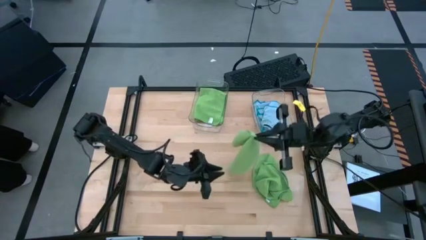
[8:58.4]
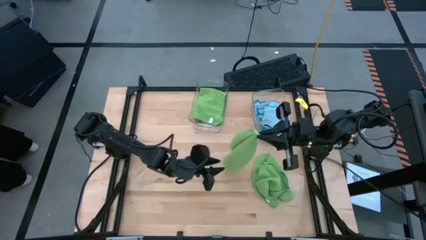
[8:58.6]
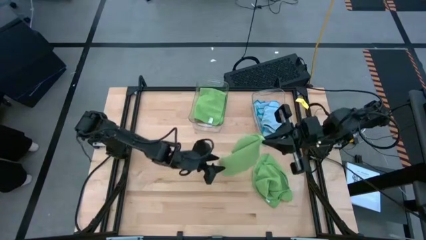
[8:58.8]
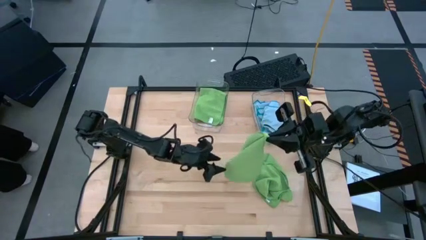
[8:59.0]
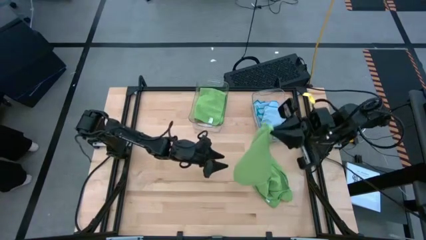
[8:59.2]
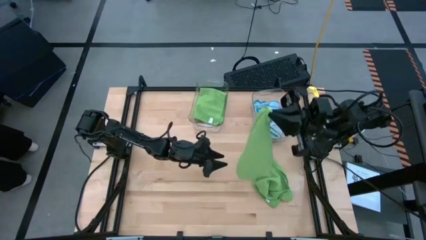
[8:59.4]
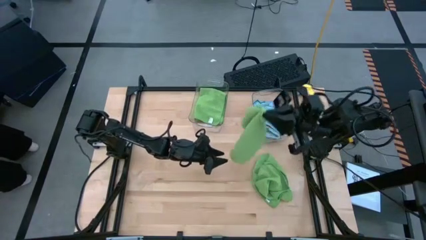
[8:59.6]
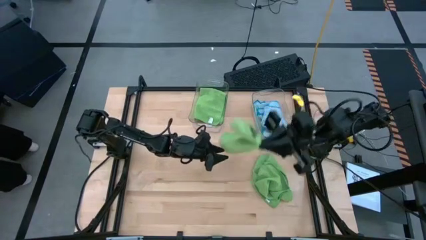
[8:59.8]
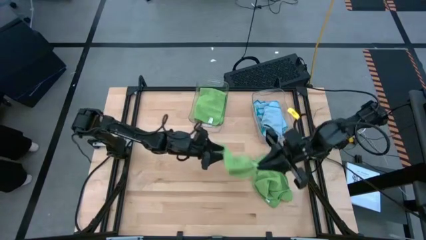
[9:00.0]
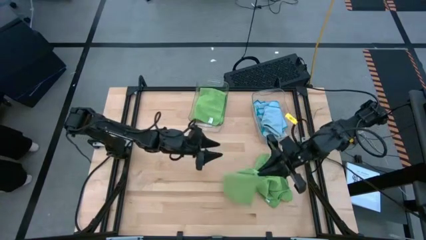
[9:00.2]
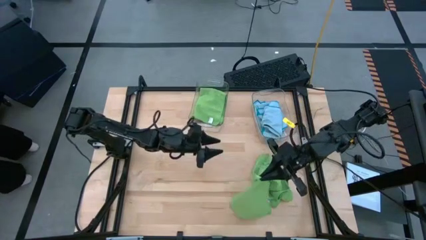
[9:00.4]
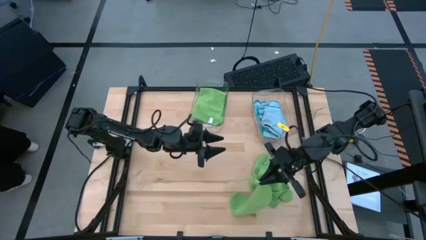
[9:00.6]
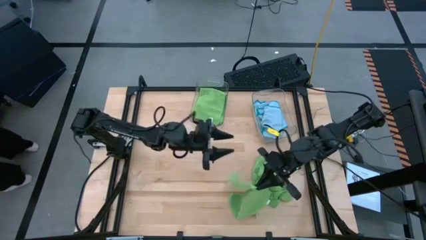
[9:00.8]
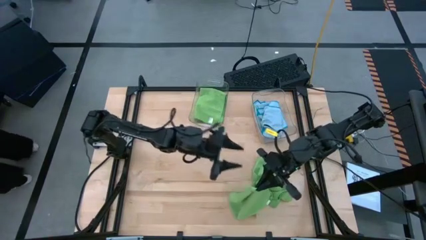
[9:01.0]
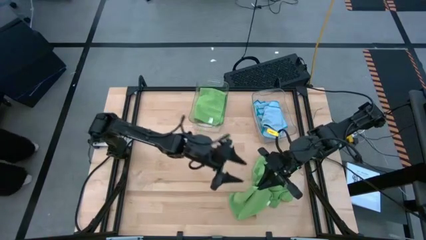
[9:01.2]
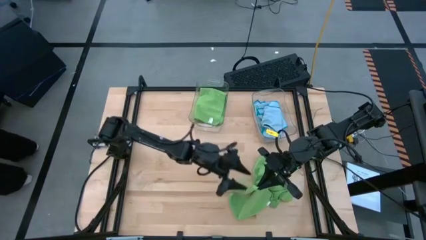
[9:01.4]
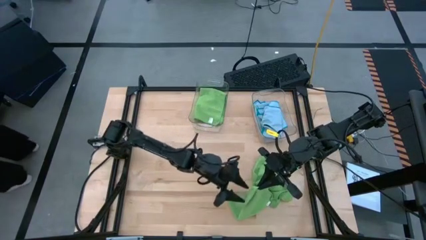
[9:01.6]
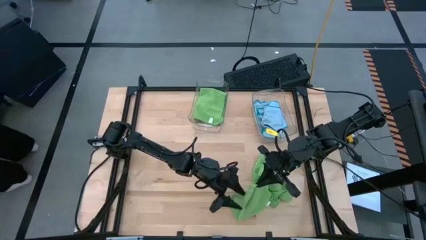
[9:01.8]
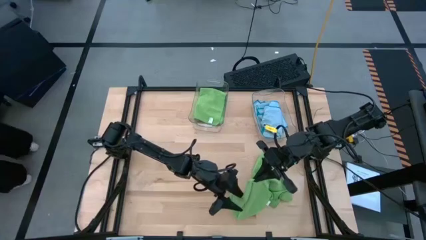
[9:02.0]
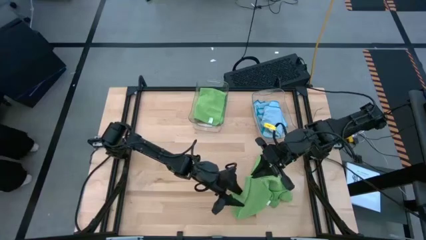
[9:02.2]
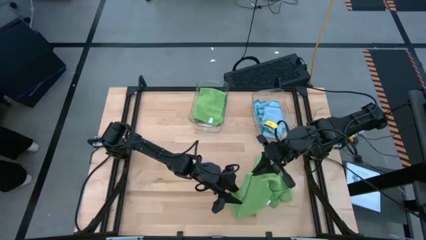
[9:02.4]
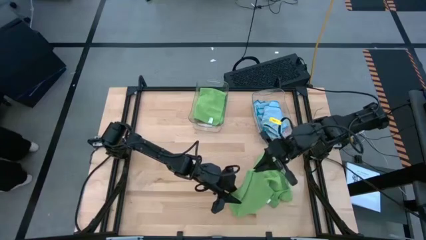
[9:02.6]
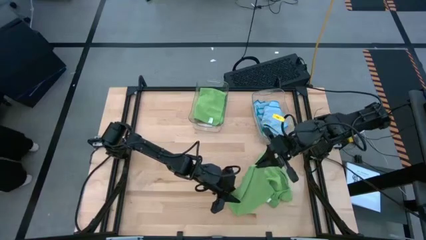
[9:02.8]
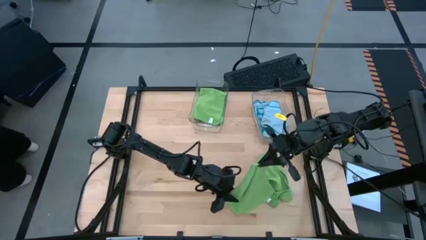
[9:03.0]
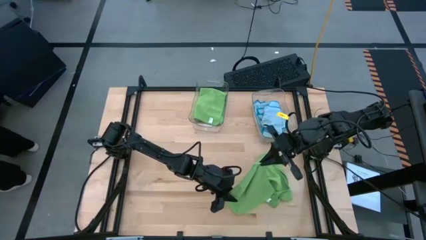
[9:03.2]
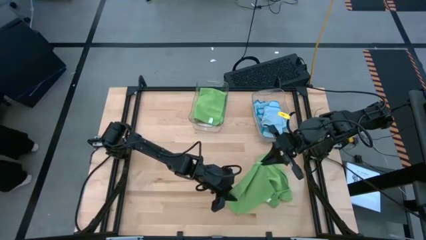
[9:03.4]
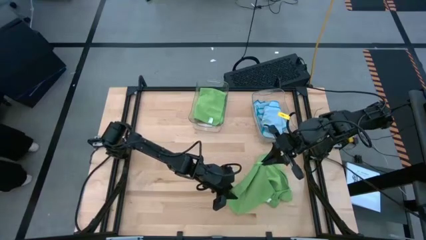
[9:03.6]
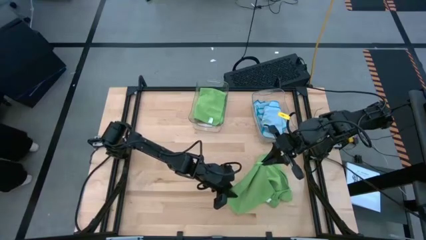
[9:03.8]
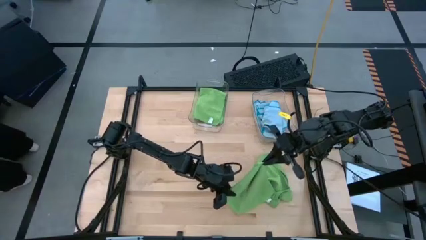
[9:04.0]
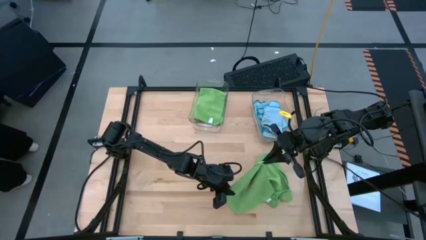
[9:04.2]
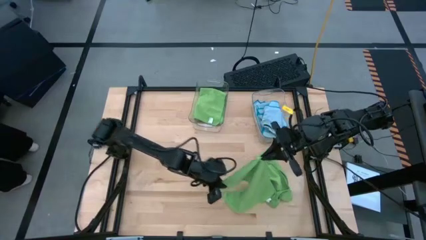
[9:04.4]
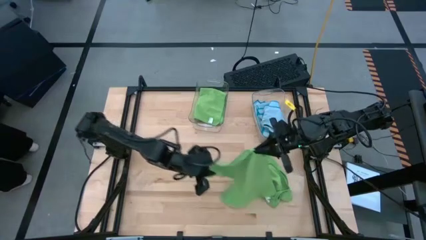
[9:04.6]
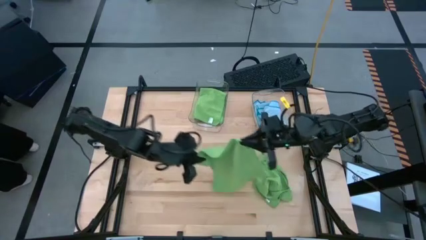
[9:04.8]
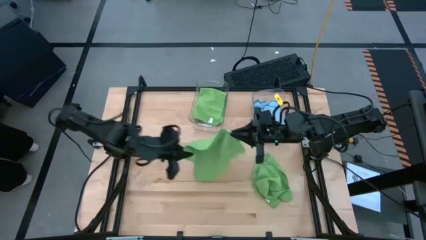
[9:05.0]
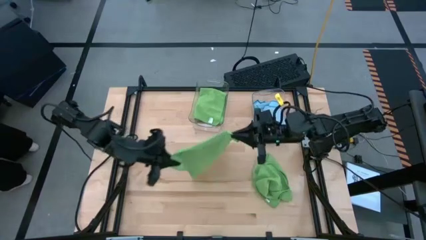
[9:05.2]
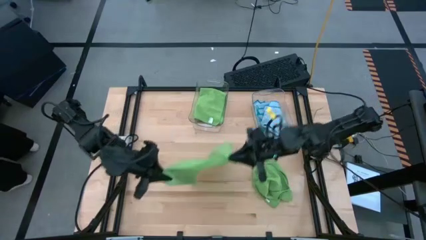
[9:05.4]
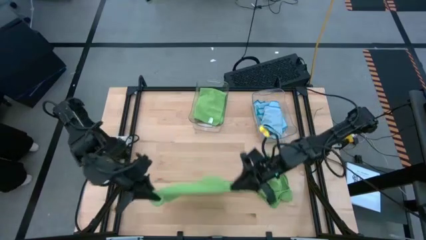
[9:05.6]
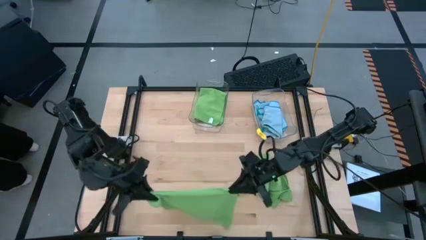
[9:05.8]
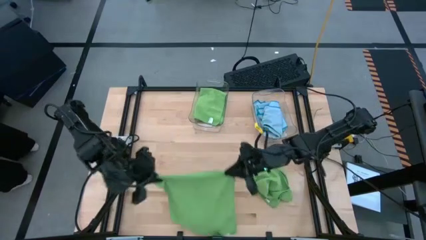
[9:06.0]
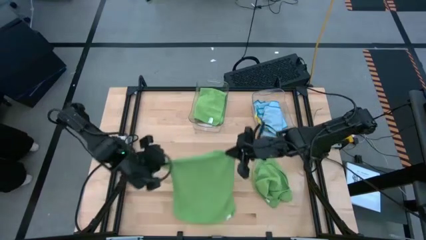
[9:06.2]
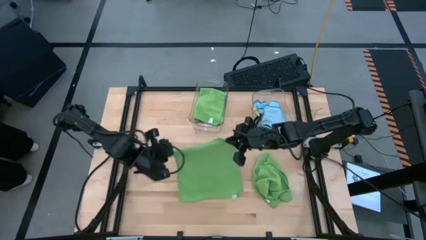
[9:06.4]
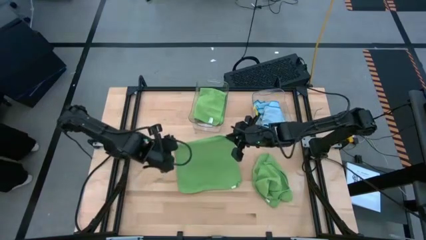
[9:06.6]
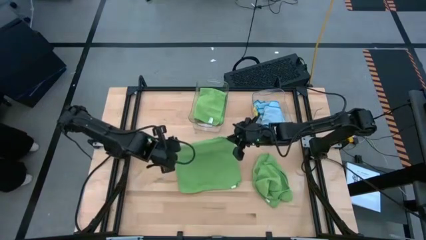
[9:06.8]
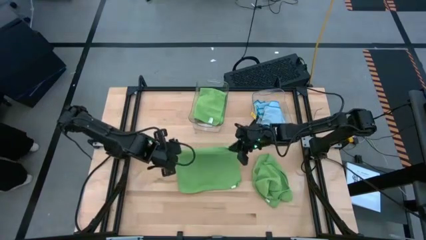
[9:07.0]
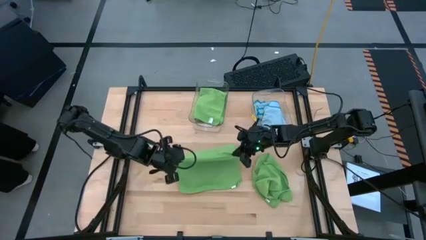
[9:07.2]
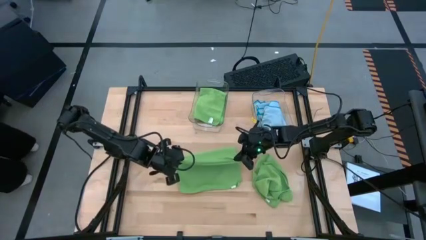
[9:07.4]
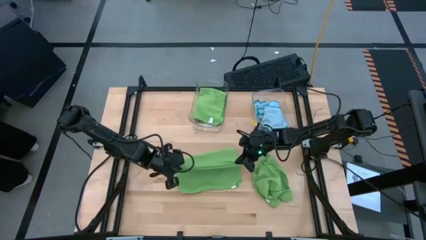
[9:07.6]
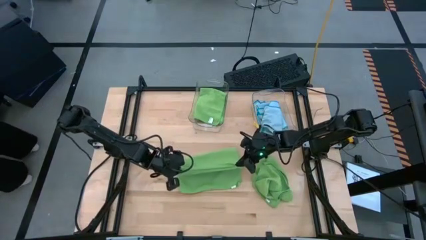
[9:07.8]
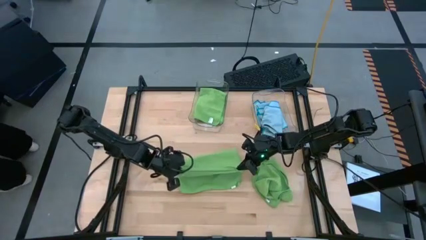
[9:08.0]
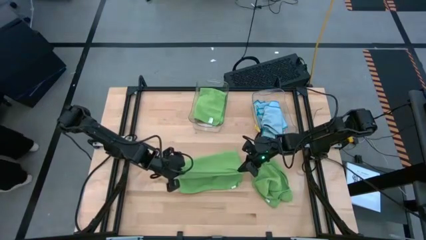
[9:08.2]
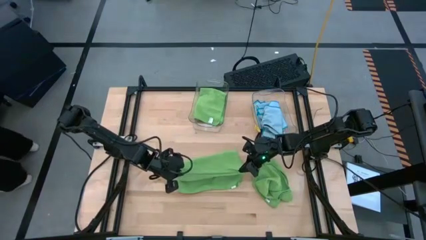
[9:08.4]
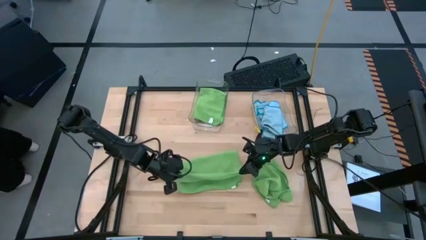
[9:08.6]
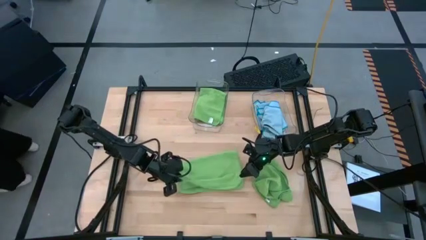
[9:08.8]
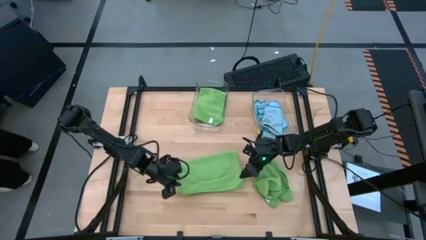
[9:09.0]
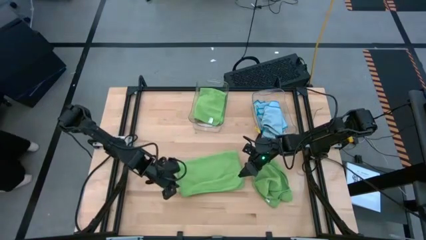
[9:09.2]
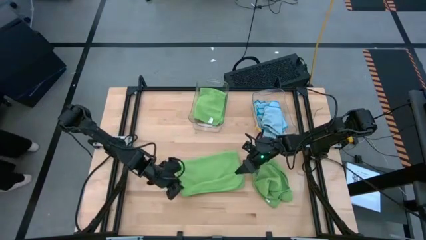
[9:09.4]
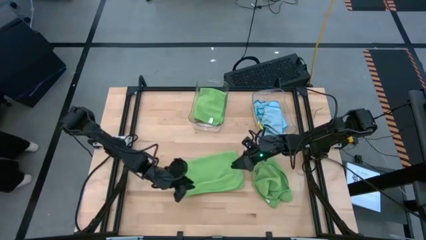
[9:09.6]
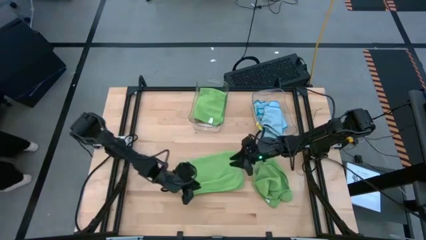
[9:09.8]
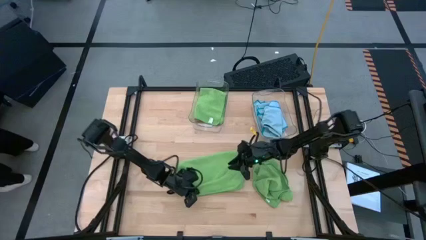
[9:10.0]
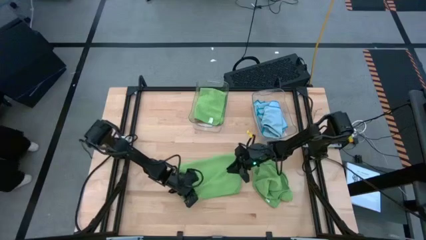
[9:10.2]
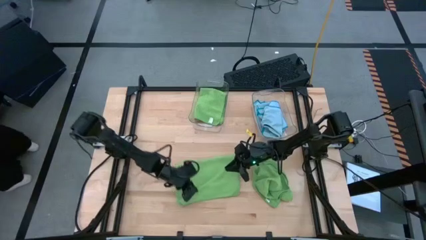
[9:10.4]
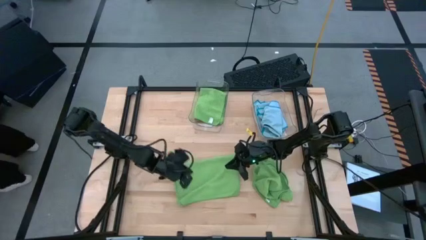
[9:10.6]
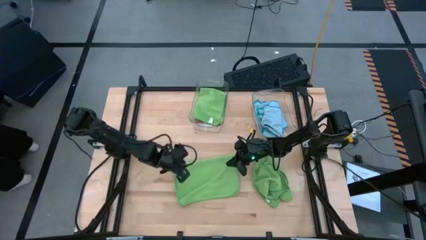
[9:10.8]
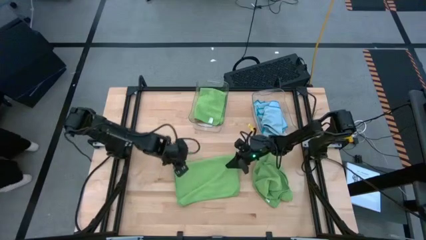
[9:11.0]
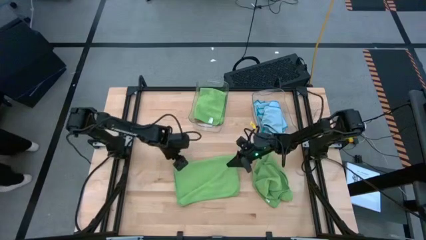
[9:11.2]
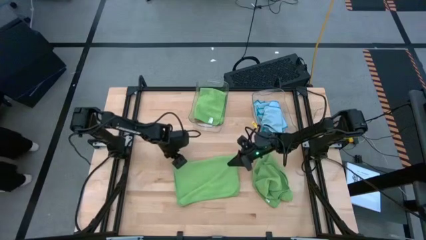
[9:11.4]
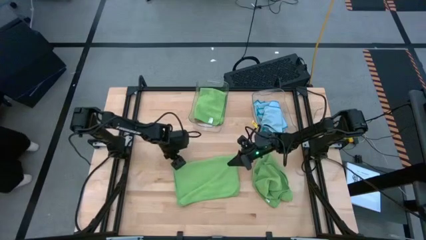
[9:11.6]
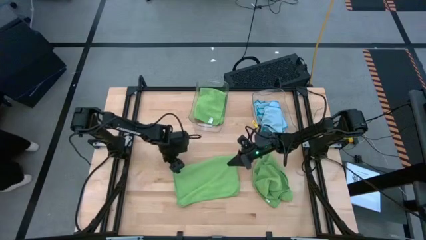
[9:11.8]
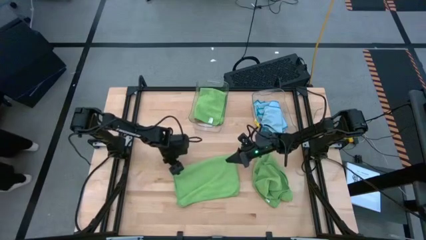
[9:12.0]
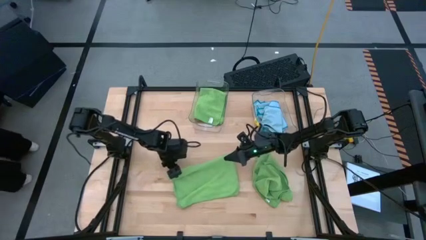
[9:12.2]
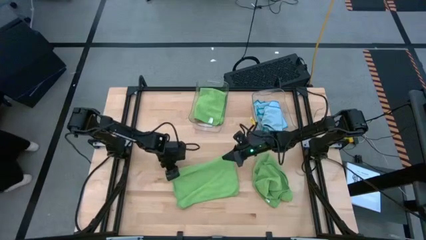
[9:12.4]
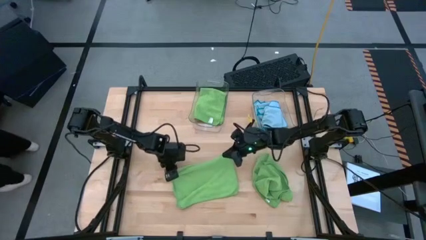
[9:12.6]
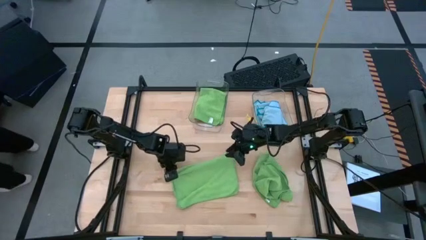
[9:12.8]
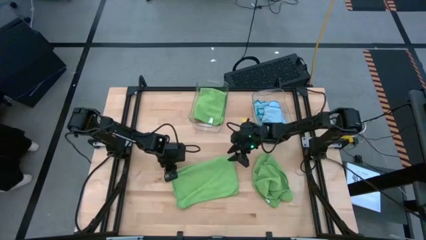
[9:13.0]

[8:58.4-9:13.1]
Task: Fold microfiber towels
Fold the top green microfiber towel
